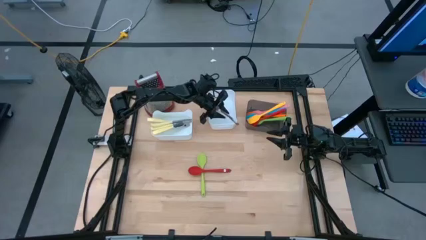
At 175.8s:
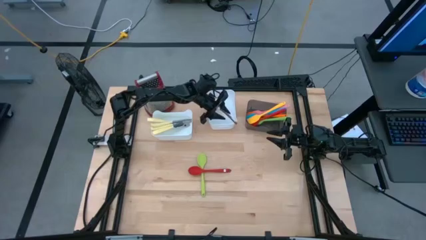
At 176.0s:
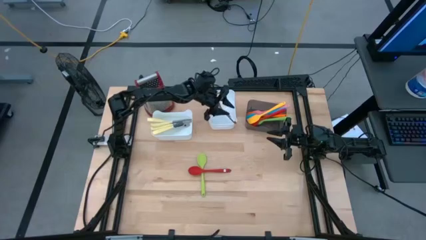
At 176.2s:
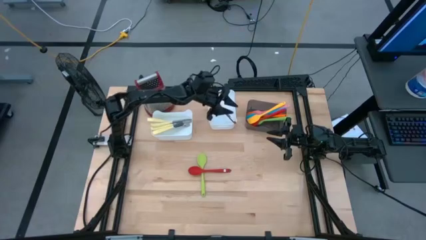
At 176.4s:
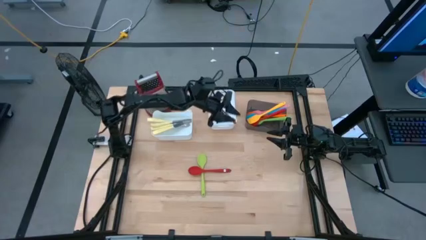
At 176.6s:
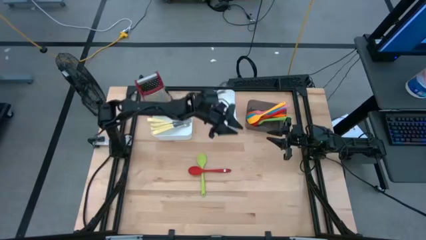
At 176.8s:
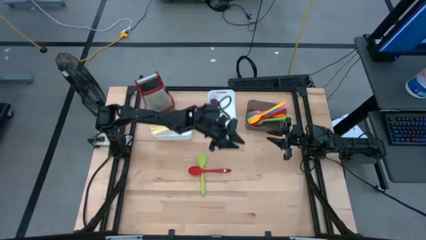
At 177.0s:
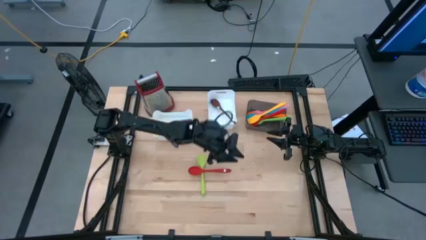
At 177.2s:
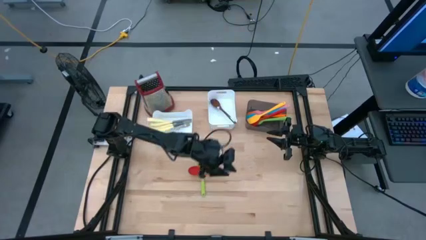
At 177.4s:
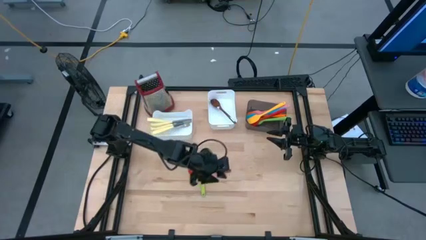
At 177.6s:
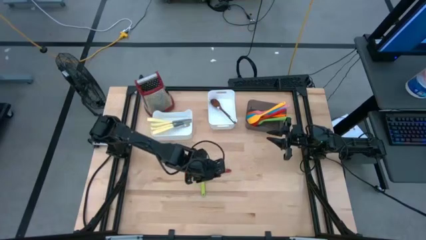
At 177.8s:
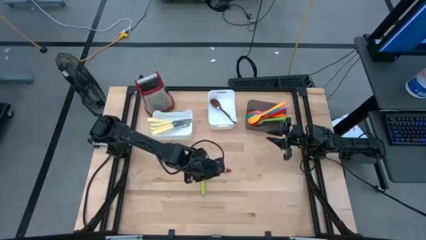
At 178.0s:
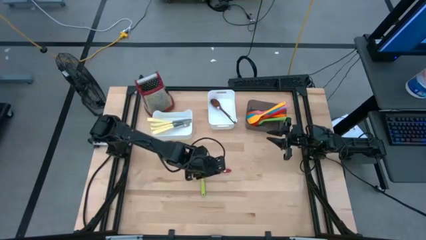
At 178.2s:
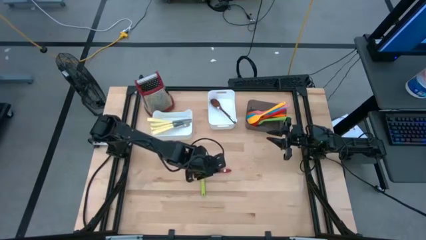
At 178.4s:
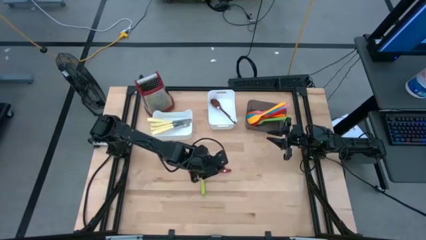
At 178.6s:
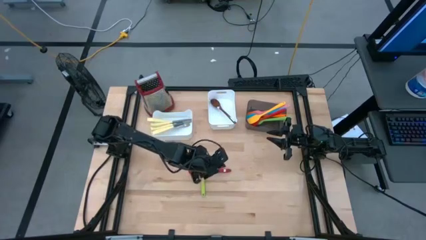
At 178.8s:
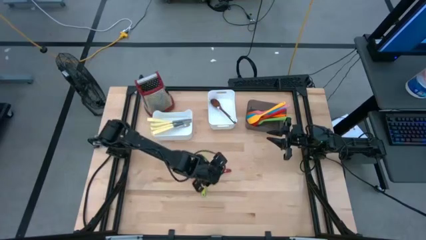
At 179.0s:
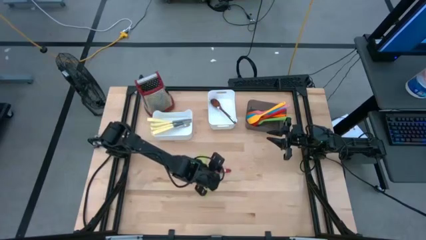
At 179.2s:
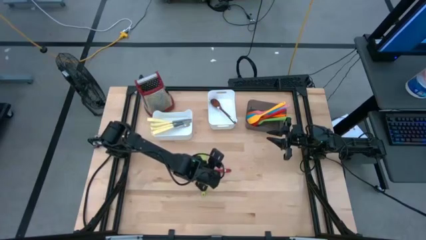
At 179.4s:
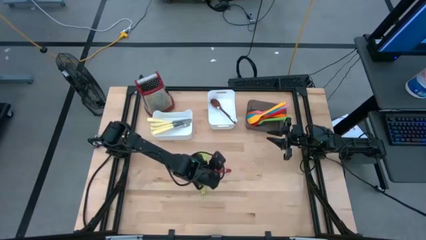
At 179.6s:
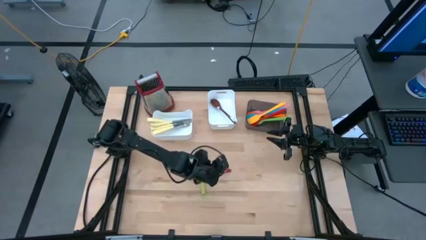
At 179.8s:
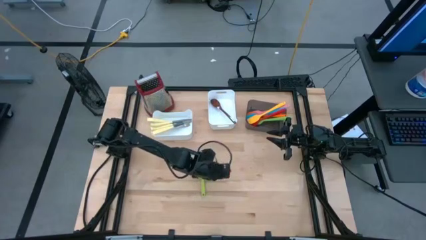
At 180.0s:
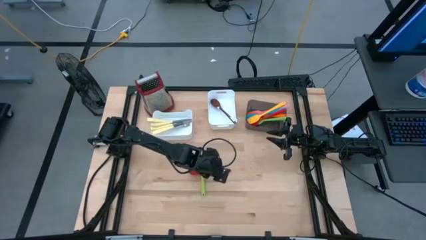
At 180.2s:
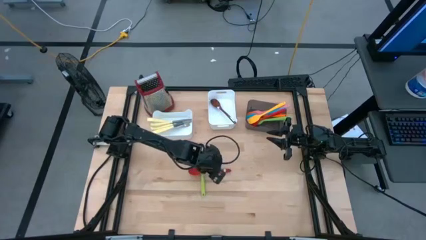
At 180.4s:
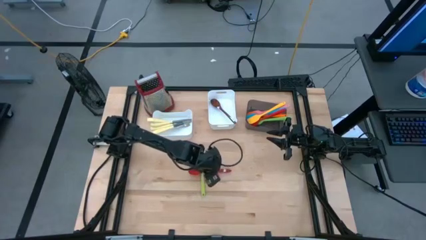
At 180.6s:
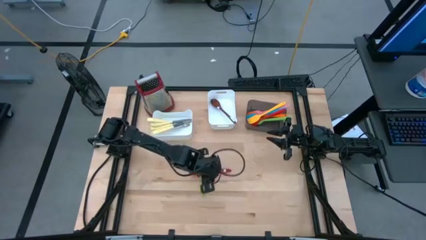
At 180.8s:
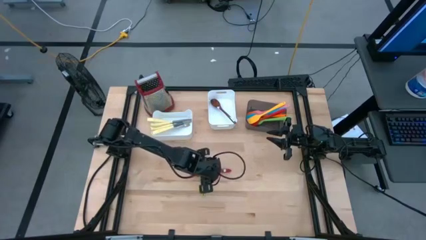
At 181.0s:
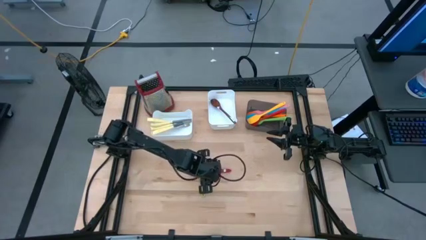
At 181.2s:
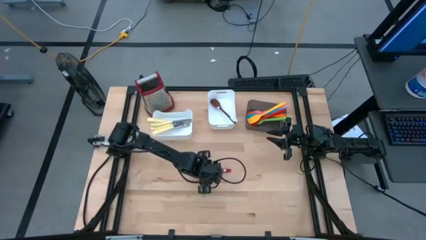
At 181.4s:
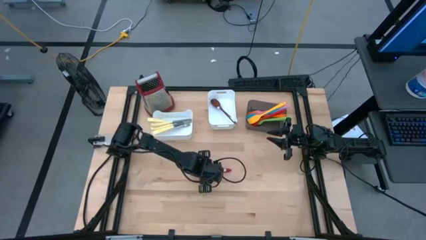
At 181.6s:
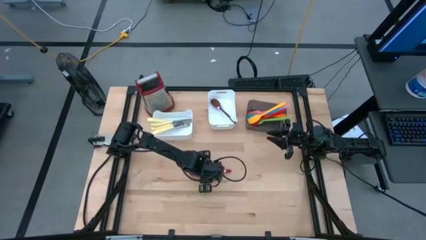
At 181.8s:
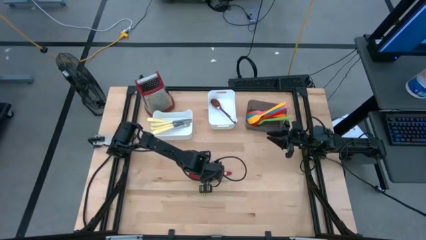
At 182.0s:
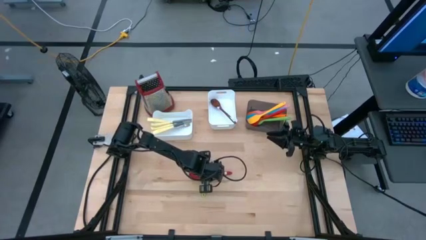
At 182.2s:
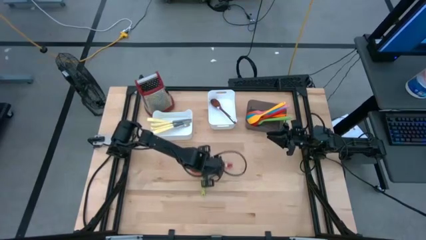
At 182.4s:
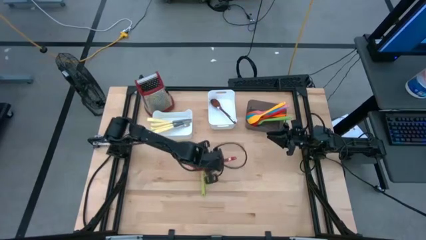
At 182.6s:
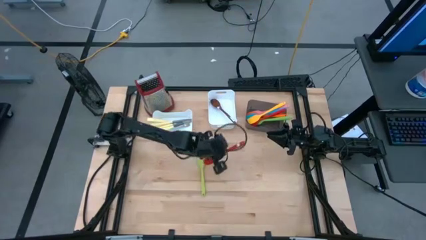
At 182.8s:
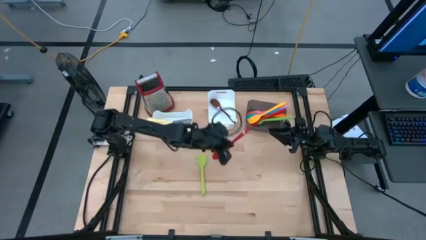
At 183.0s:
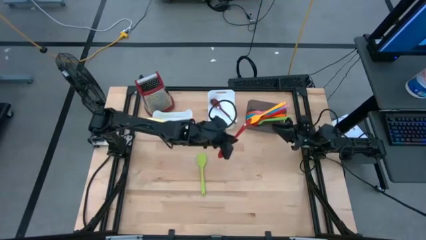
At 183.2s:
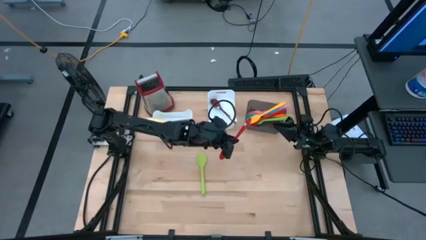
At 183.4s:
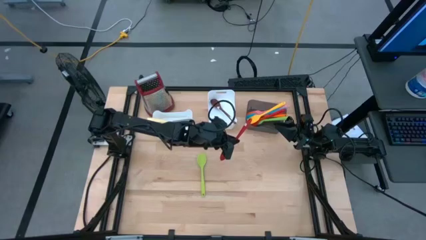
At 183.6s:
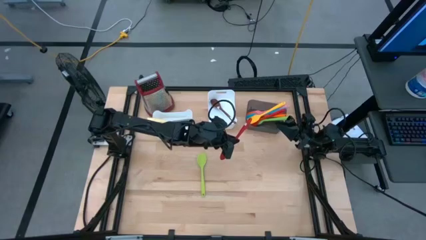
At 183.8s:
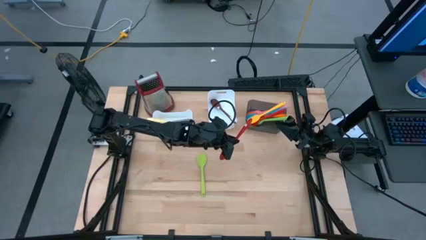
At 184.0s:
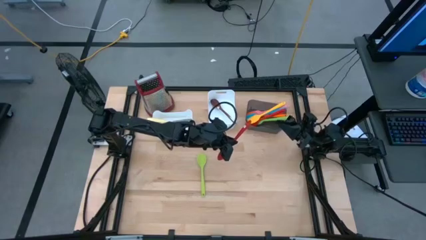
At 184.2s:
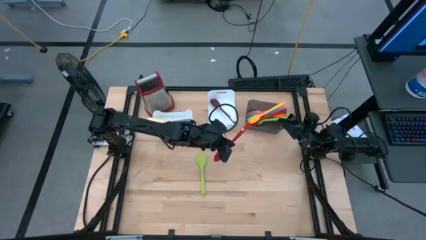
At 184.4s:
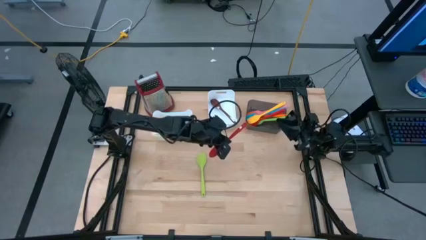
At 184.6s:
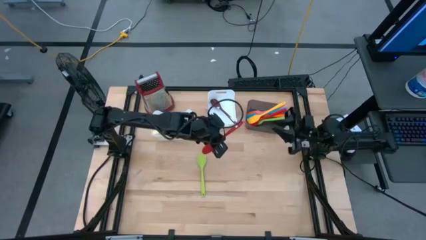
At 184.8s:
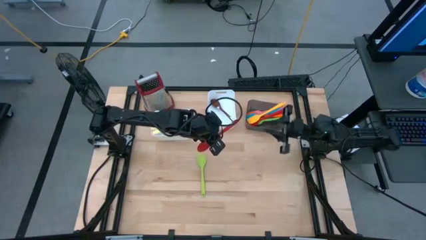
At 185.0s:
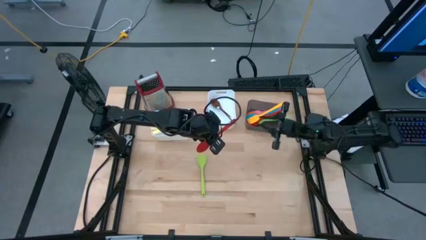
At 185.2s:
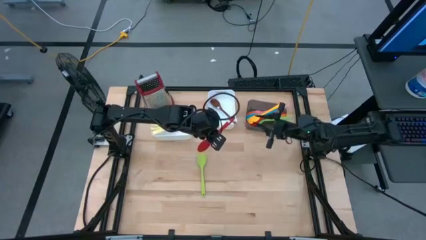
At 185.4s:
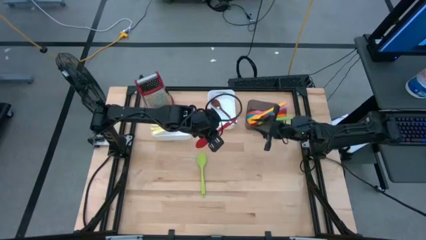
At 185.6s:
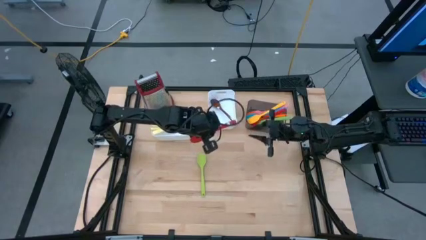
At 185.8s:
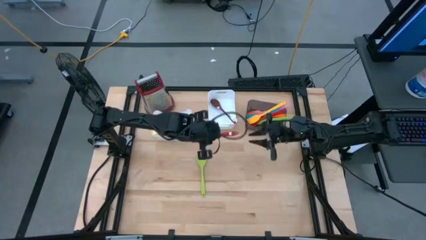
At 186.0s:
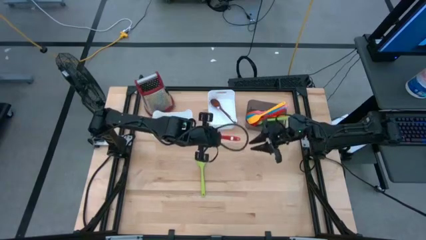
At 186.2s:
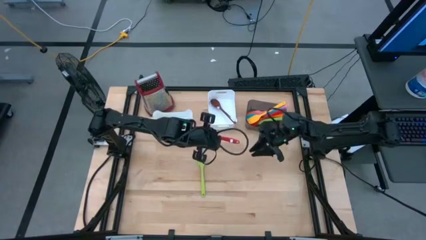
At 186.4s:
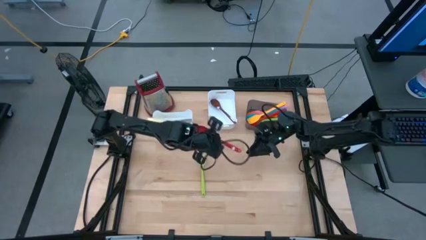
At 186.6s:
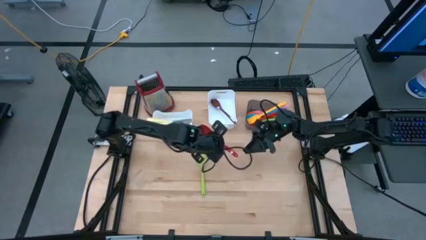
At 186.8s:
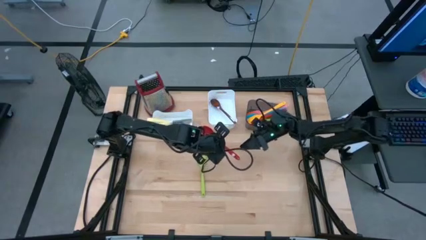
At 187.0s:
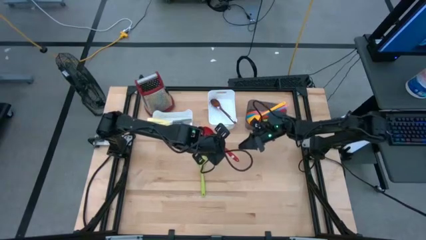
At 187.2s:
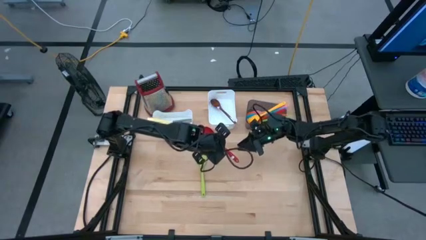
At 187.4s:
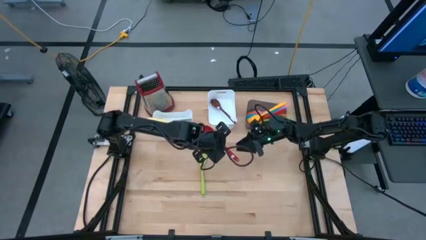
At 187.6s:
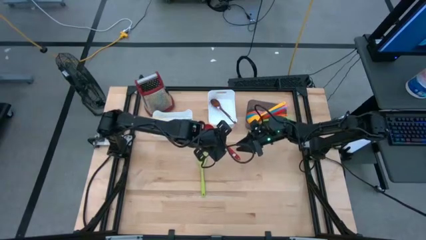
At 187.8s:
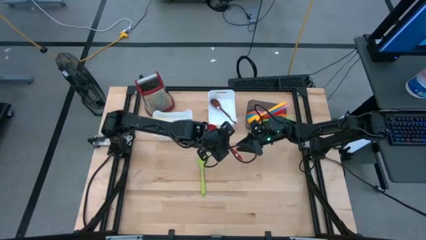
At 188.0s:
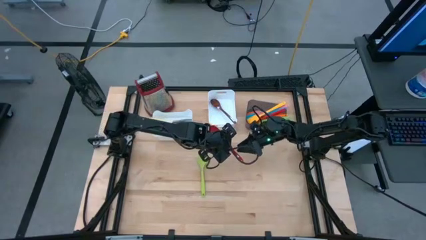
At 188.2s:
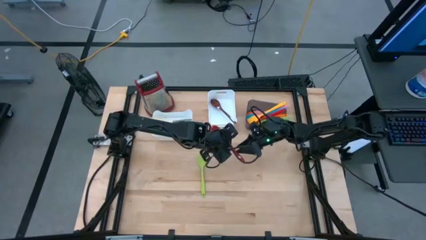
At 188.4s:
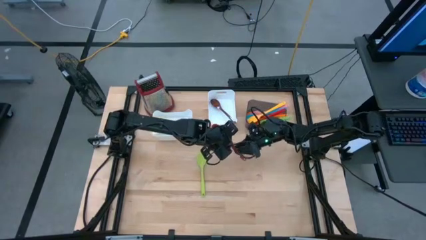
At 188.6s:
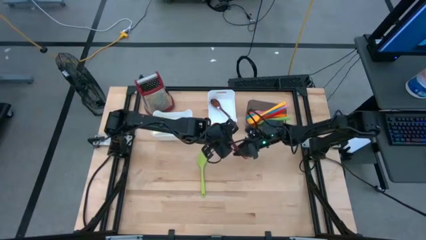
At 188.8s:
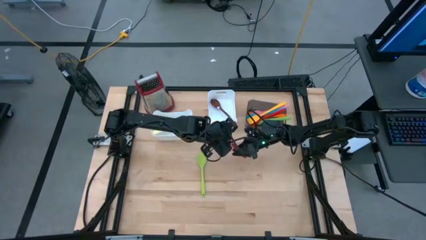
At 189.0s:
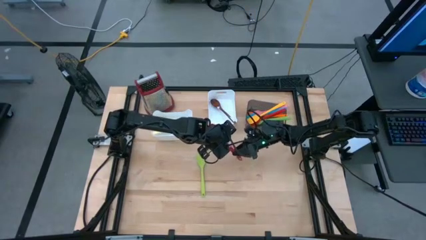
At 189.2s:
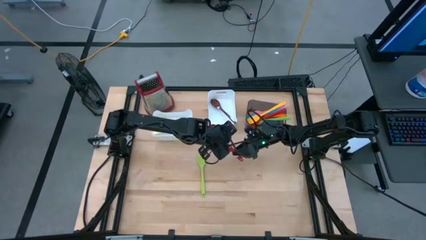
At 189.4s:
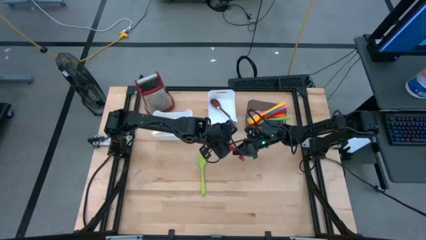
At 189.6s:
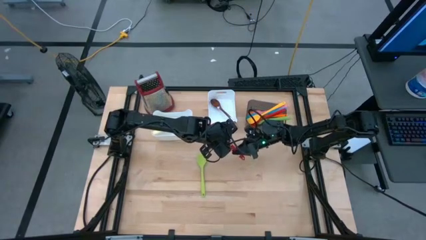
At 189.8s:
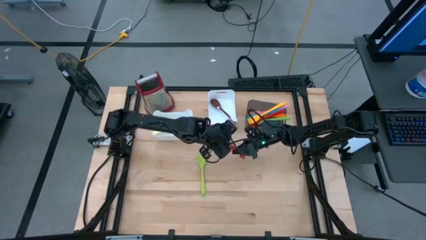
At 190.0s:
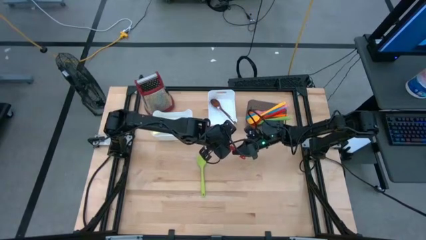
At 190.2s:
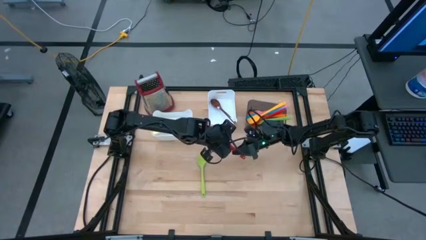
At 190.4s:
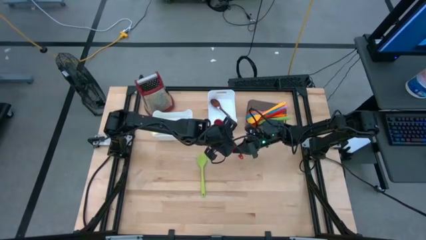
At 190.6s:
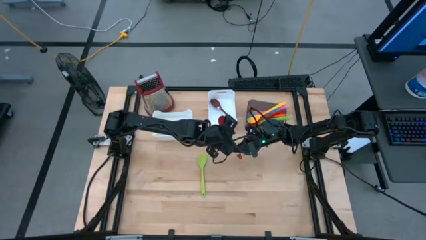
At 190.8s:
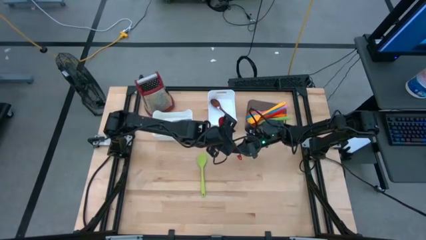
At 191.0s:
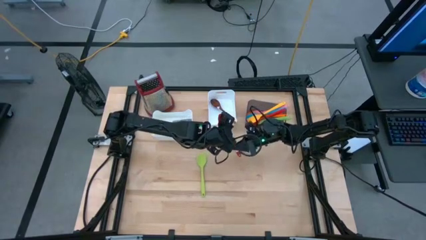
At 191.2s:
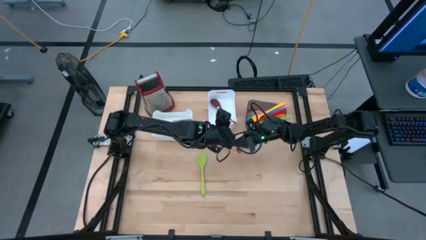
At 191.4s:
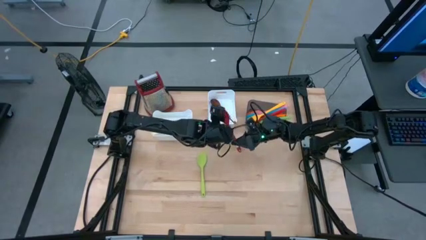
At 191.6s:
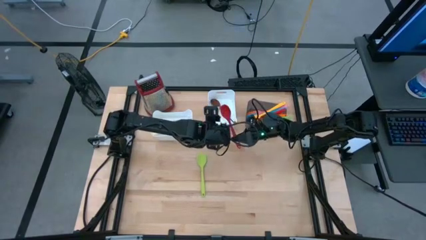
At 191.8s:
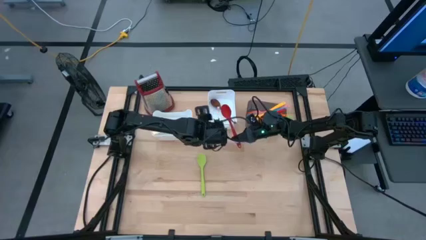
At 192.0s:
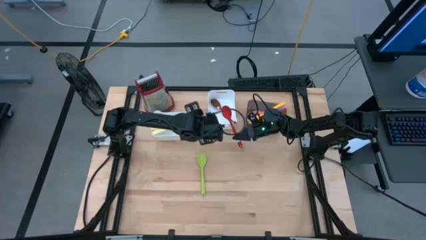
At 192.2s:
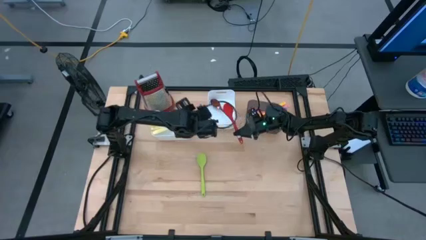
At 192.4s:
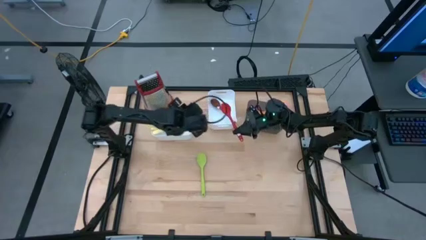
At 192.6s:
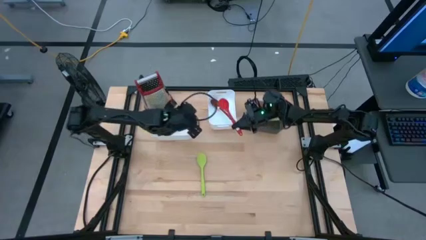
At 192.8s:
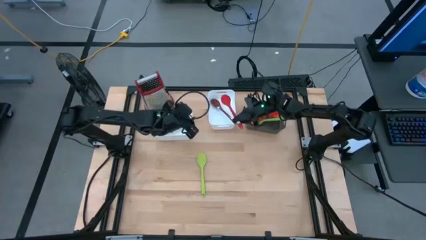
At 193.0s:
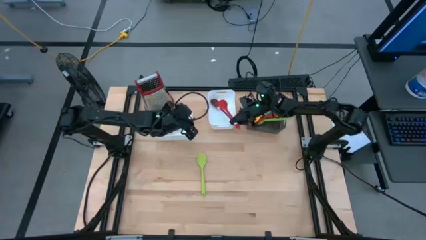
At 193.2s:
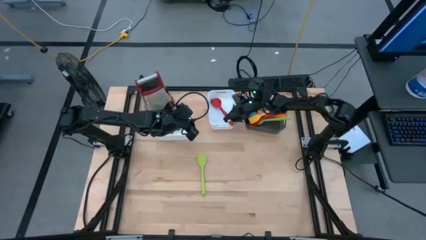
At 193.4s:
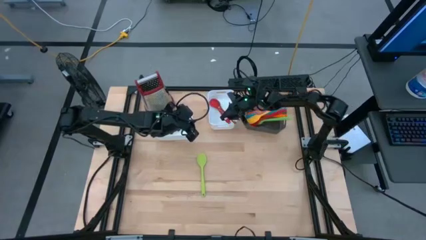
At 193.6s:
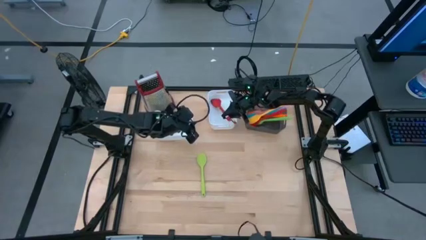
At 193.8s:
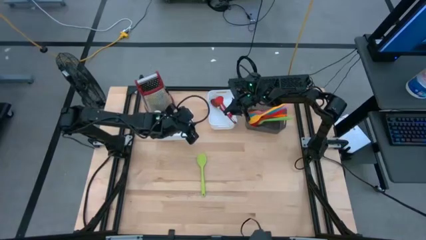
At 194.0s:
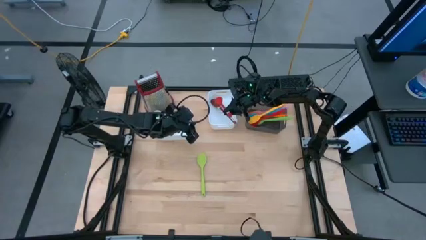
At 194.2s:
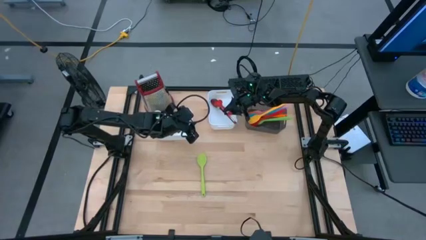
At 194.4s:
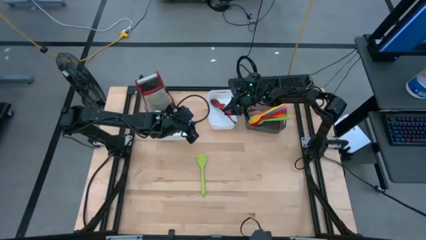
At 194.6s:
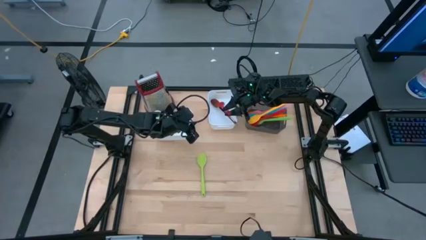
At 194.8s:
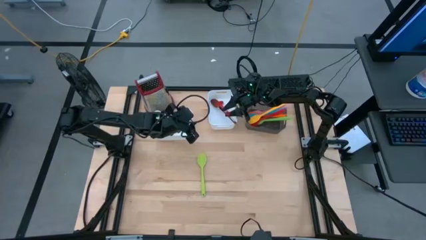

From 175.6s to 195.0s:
Task: Pick & Place Kitchen Items
Put the red serving spoon into the right white bin
